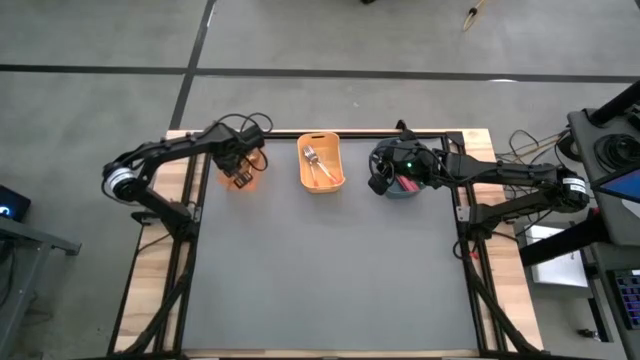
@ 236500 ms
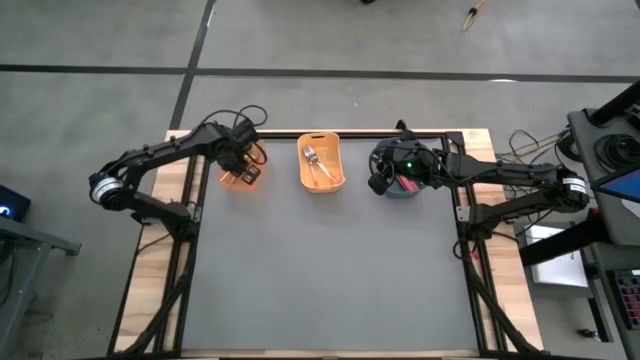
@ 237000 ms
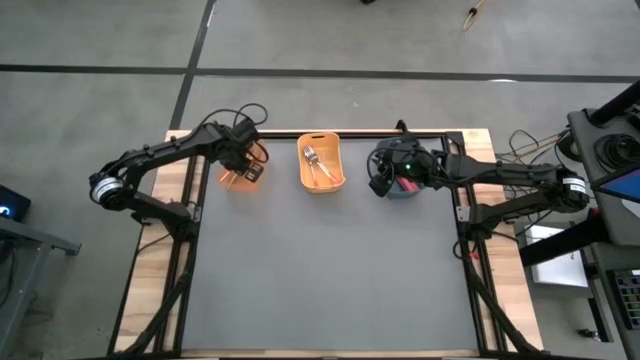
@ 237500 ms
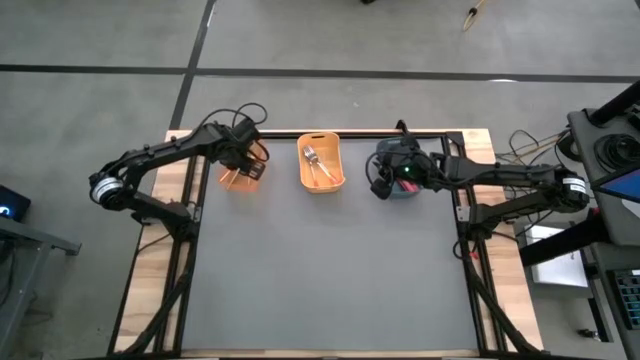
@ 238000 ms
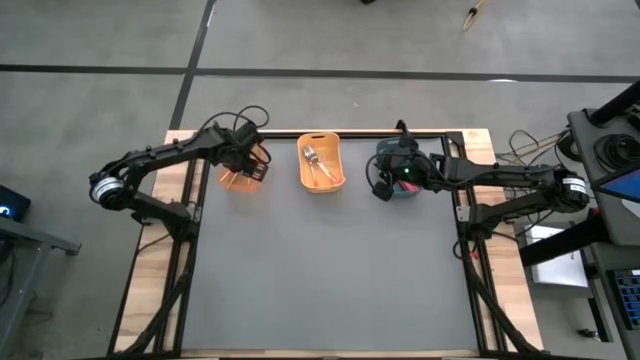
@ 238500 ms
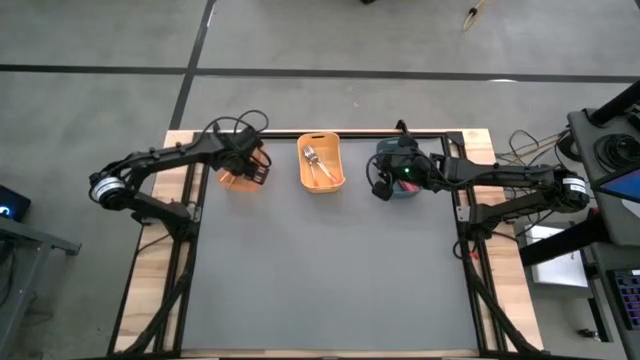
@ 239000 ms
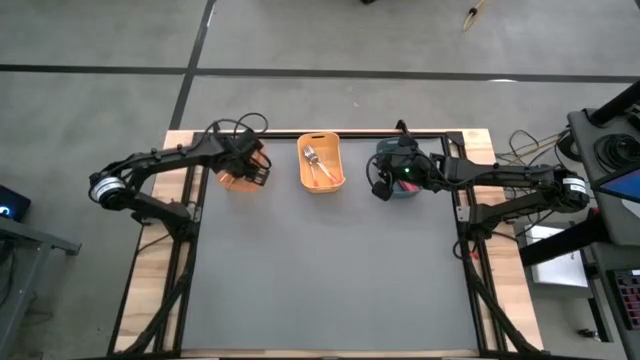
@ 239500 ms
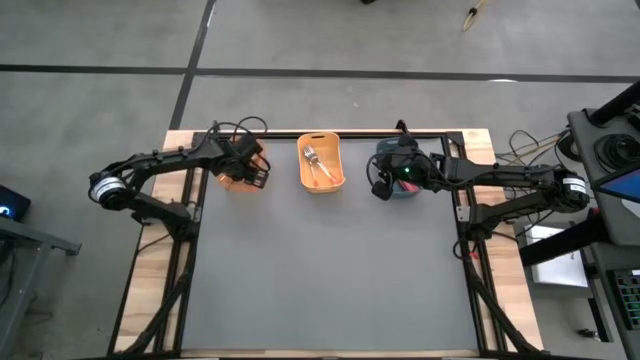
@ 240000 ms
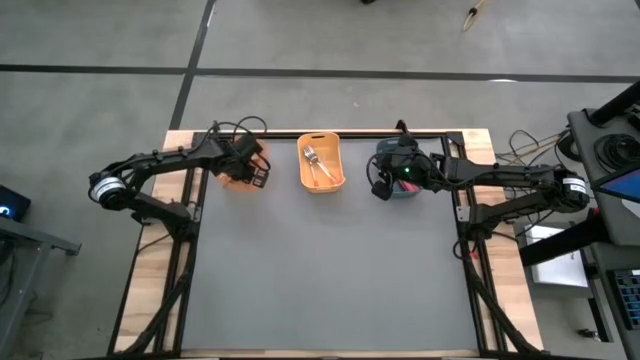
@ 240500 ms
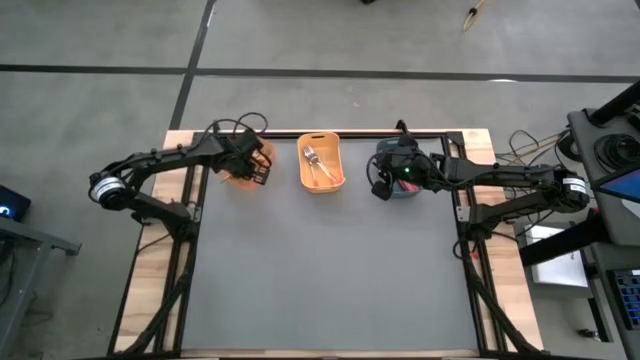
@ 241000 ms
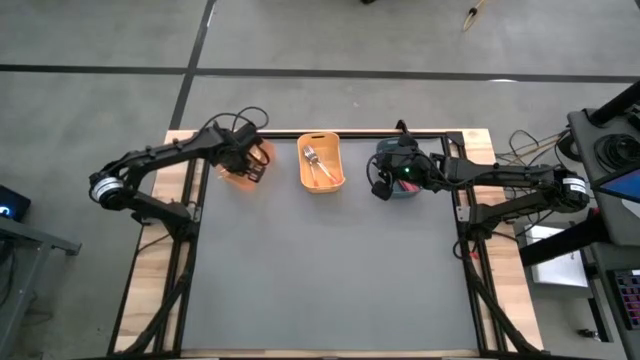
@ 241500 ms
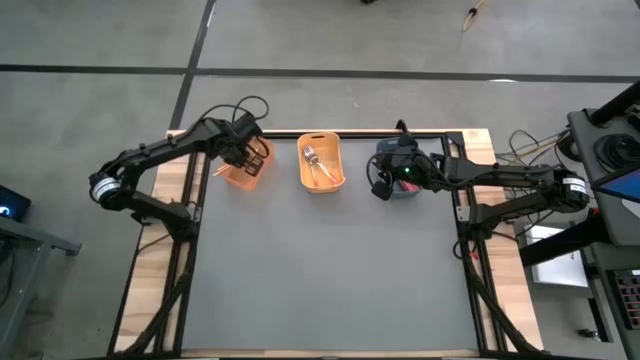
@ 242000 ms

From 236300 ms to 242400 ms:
Task: Sort silverware by color (type)
Adjust the gold forks in the orange bin

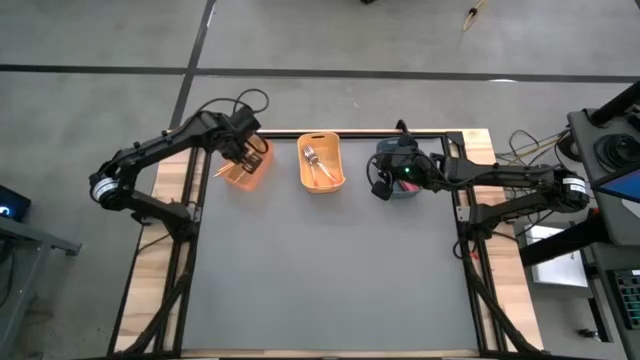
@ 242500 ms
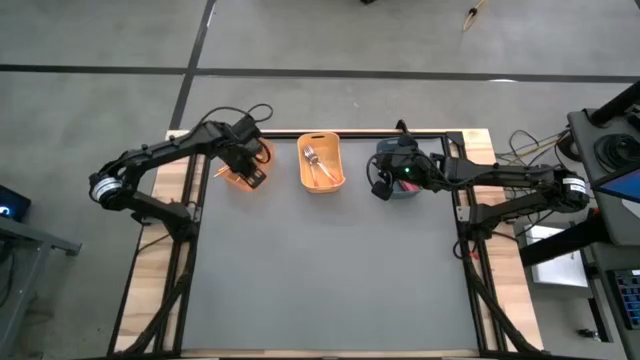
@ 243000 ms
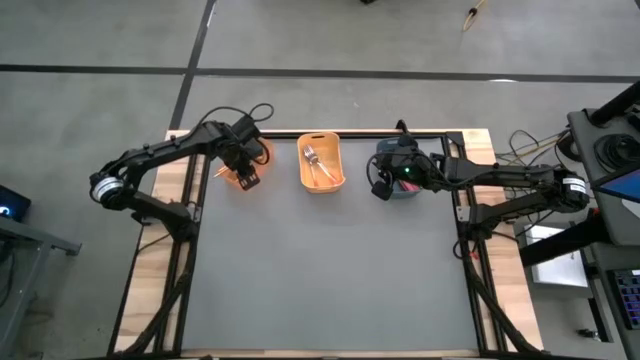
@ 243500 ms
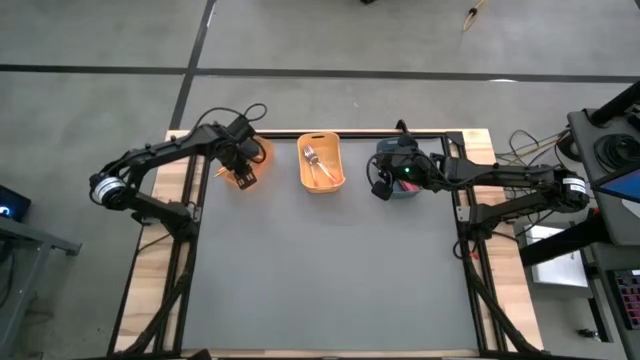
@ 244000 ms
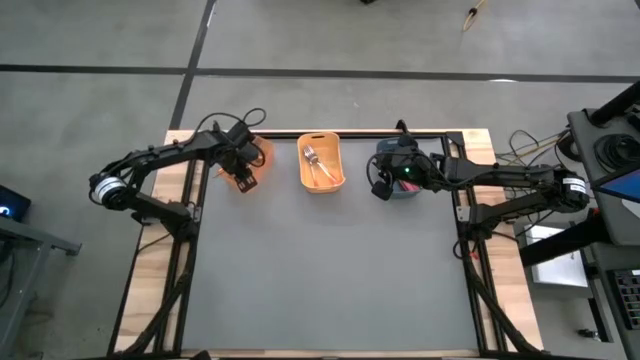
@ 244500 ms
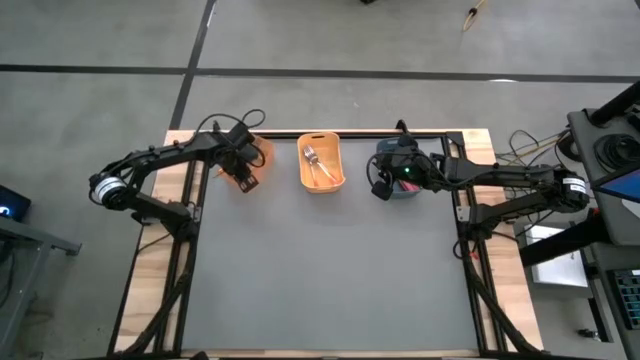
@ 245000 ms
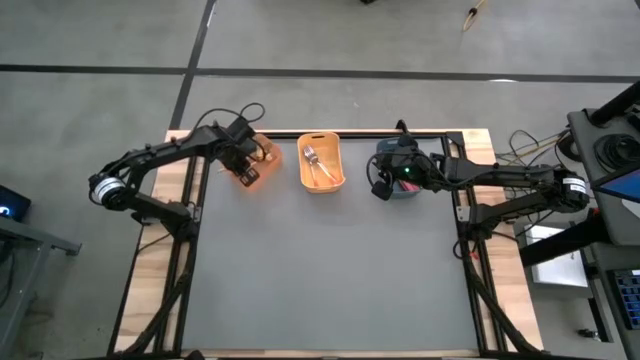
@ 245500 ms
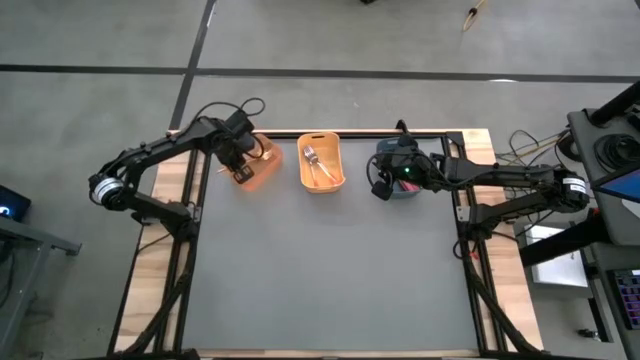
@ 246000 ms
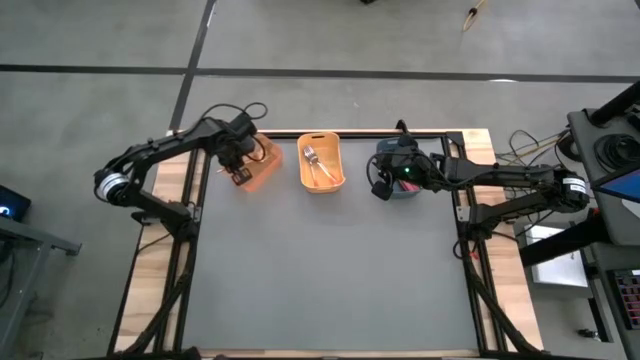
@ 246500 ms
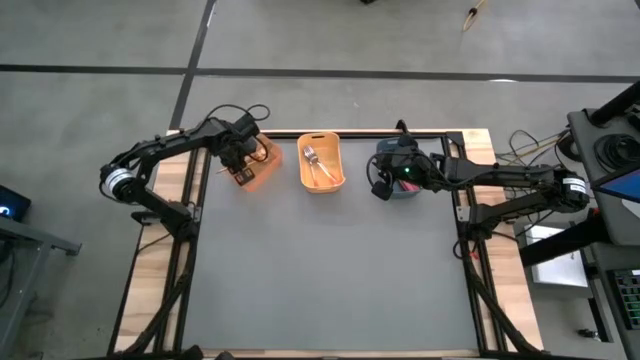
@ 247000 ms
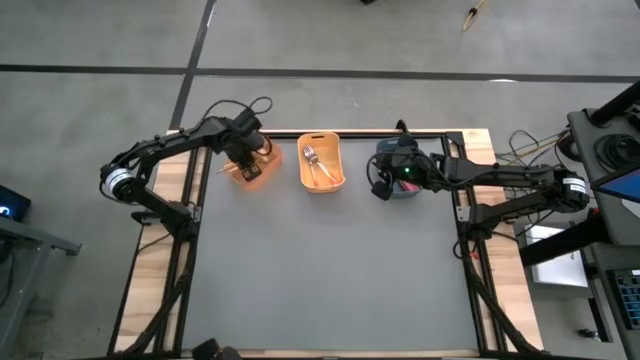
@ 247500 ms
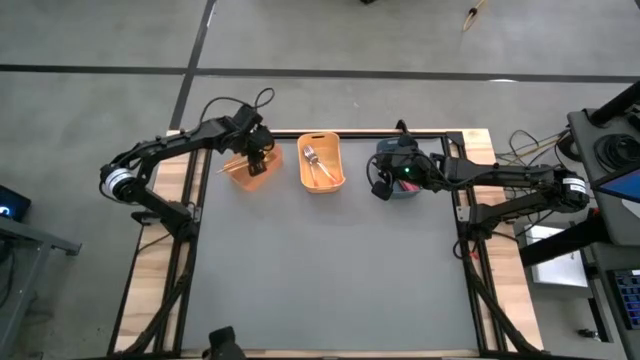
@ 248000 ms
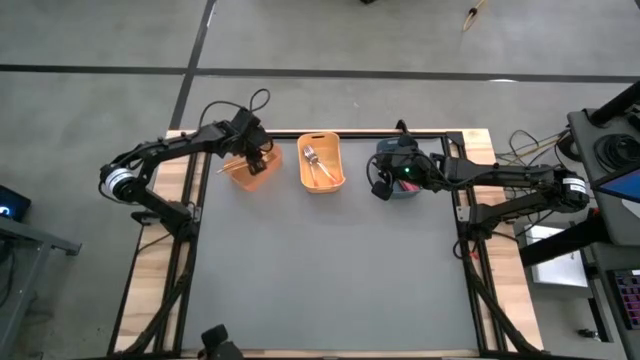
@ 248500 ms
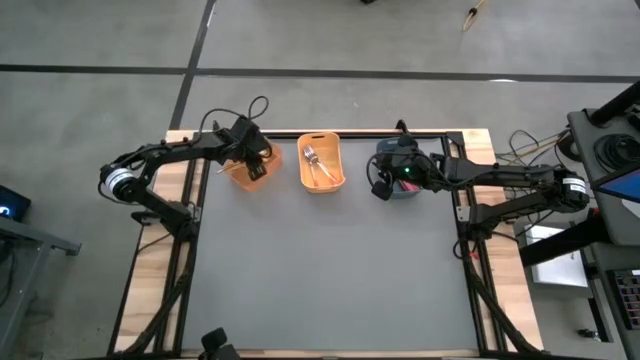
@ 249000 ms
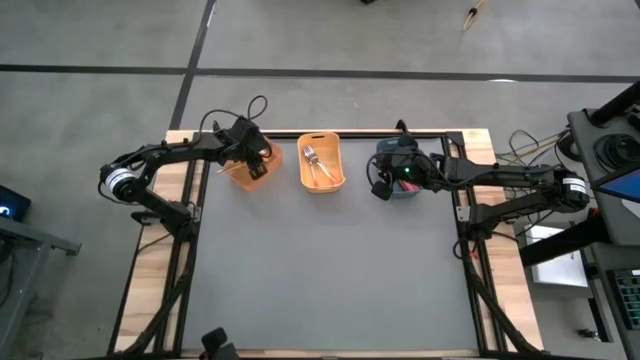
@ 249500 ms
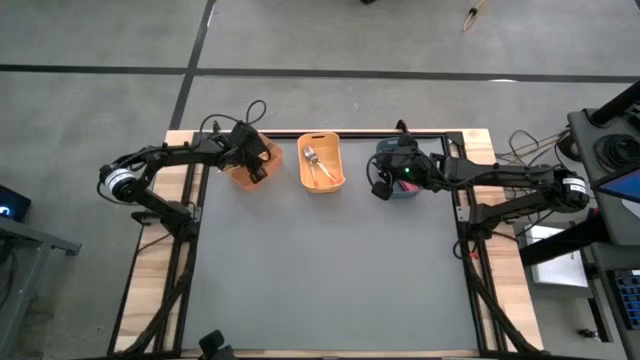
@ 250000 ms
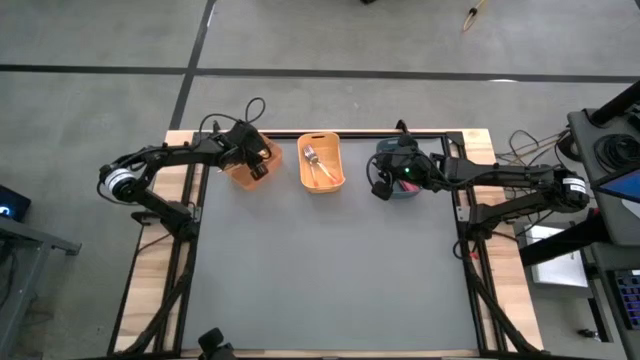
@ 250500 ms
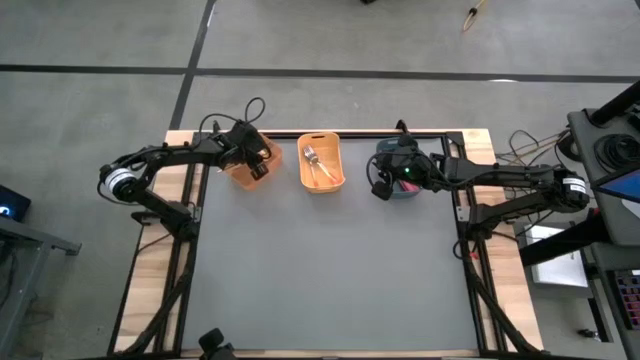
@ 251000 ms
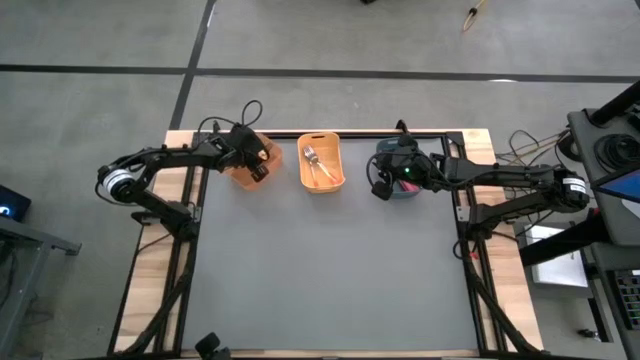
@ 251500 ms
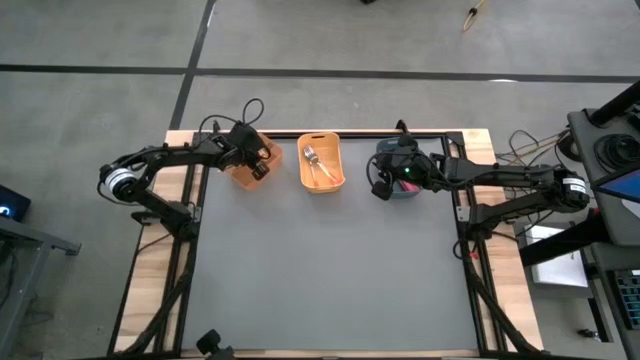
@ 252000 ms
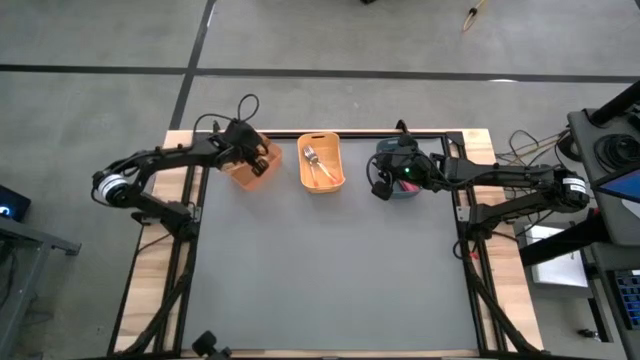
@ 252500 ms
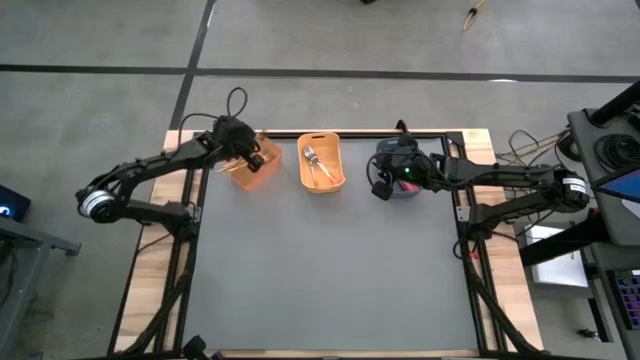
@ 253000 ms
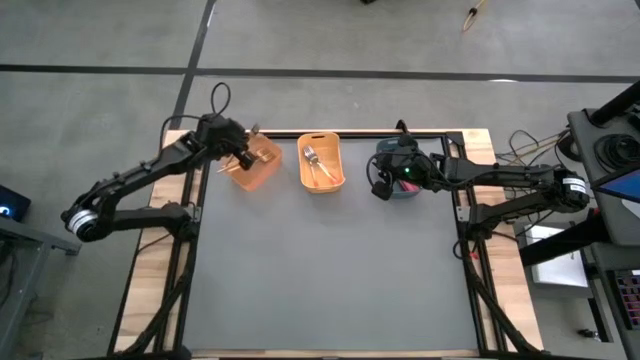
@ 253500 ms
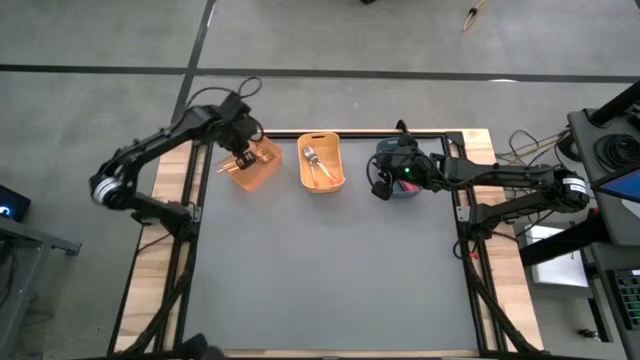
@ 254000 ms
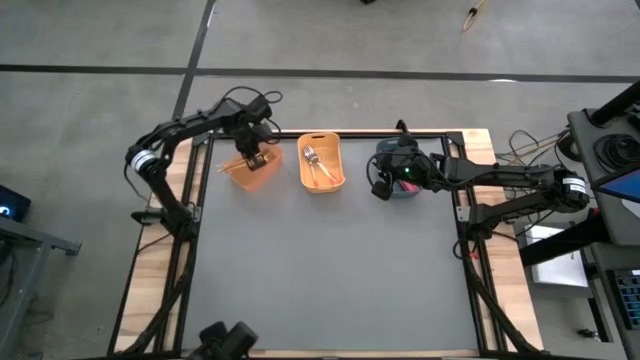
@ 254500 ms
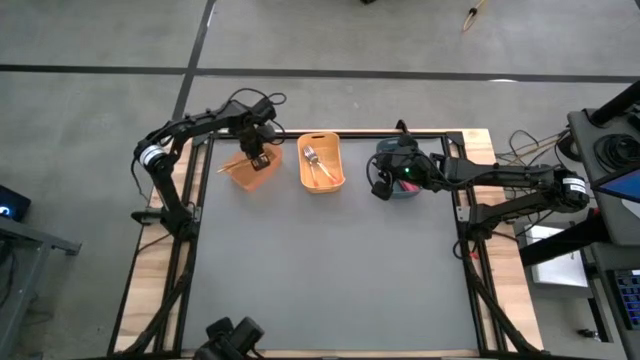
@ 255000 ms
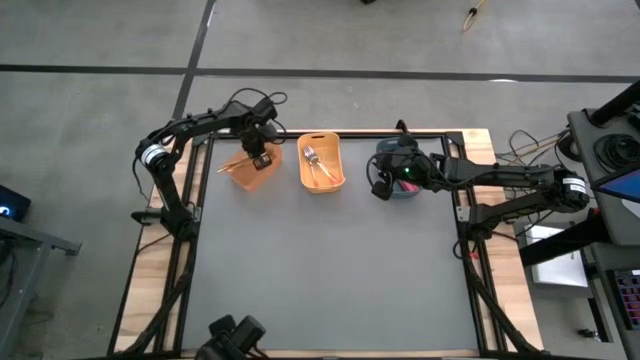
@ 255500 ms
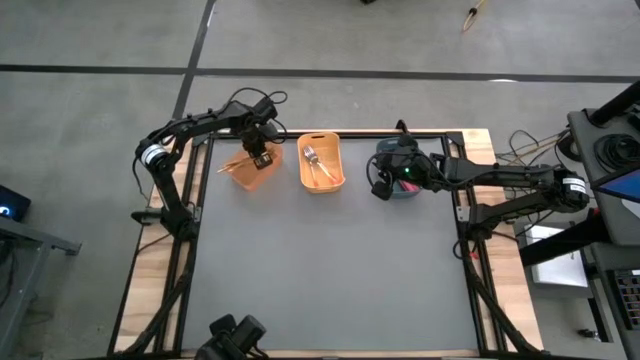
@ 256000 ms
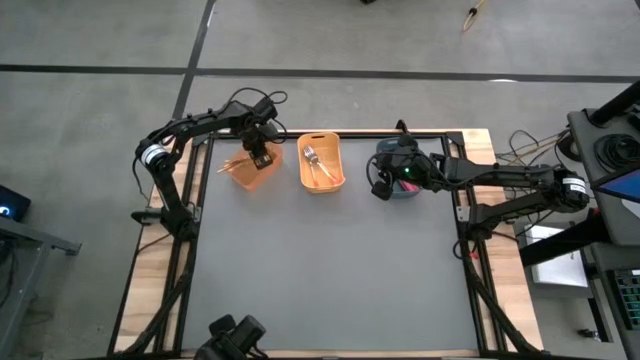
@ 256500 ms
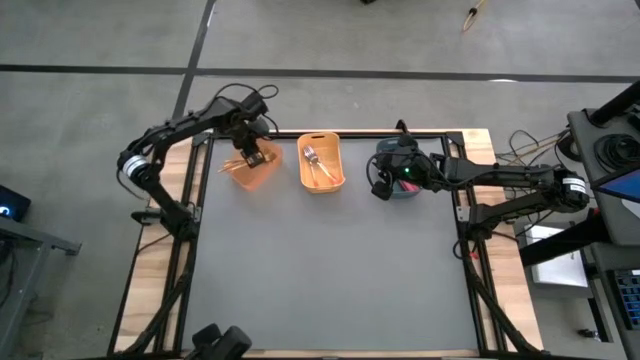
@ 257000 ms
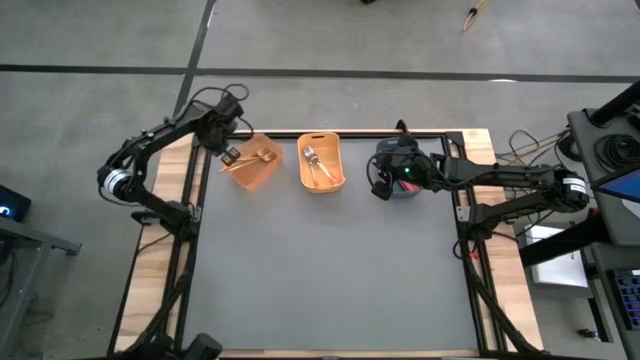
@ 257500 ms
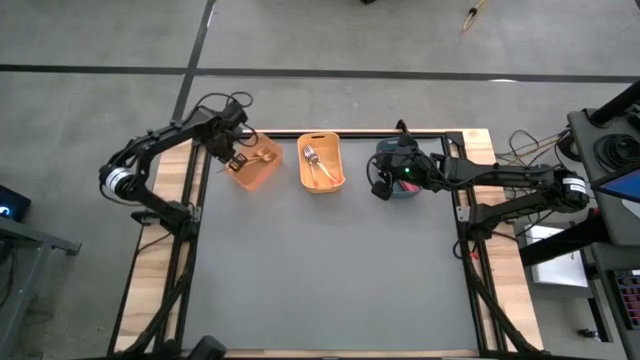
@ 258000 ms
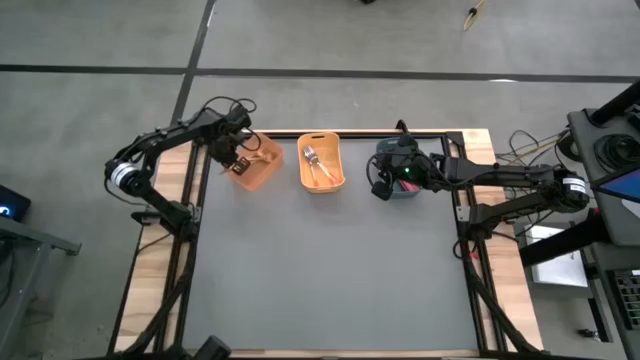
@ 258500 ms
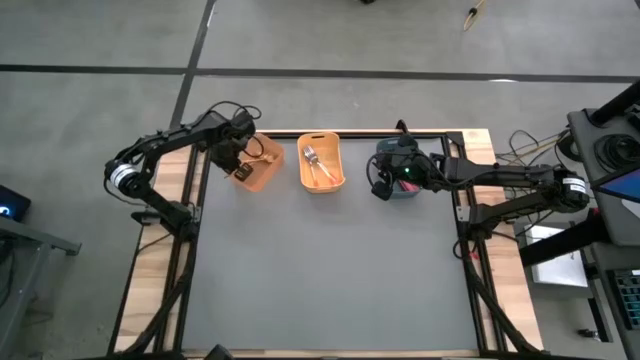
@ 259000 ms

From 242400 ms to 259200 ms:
Adjust the gold forks in the orange bin
